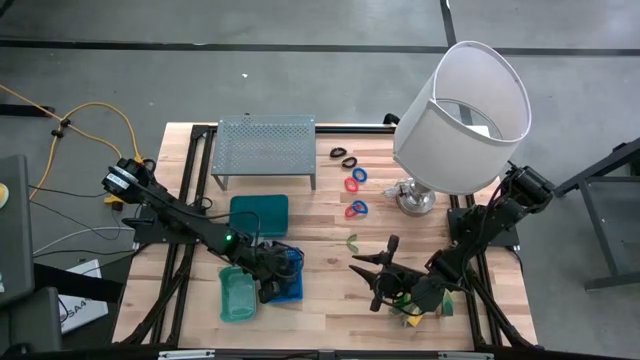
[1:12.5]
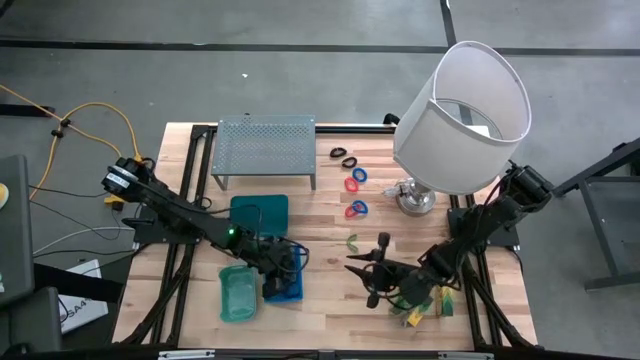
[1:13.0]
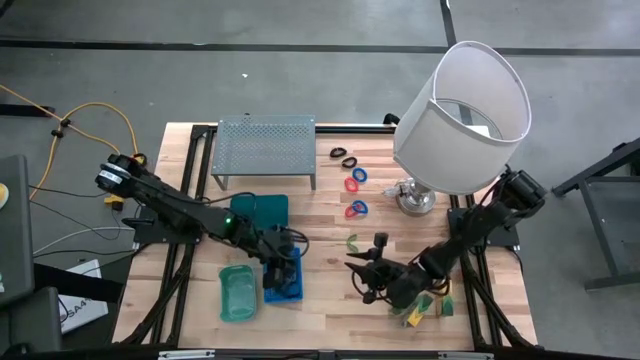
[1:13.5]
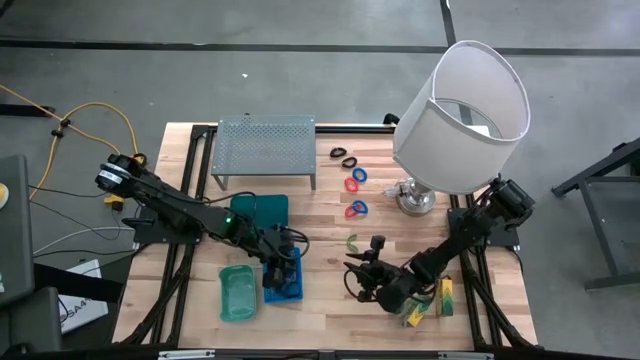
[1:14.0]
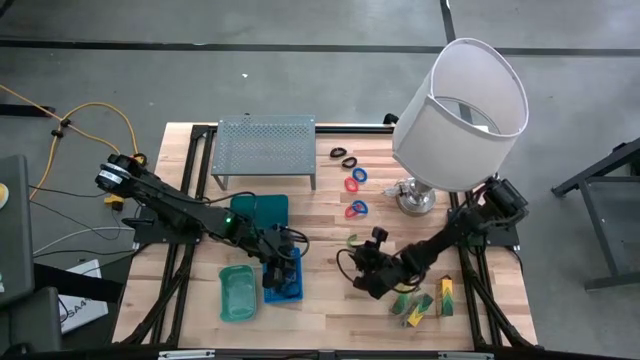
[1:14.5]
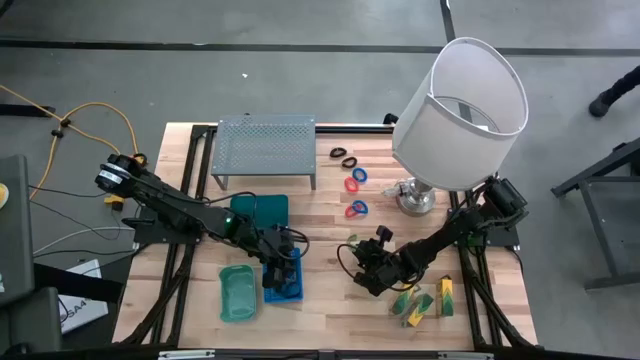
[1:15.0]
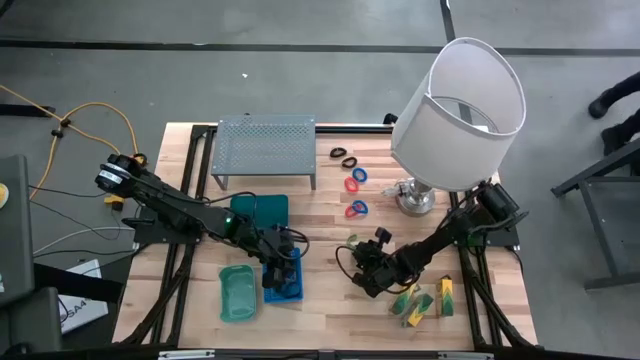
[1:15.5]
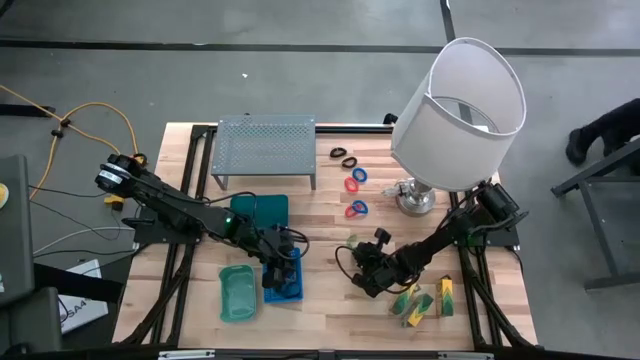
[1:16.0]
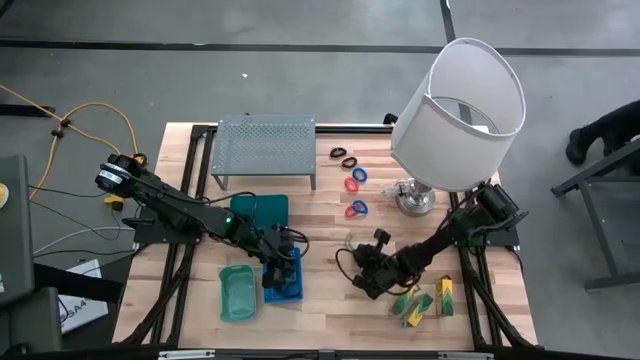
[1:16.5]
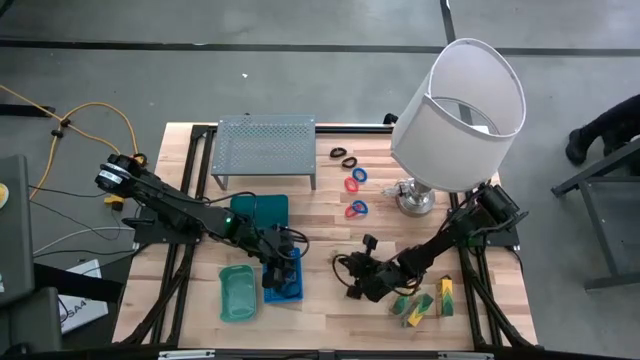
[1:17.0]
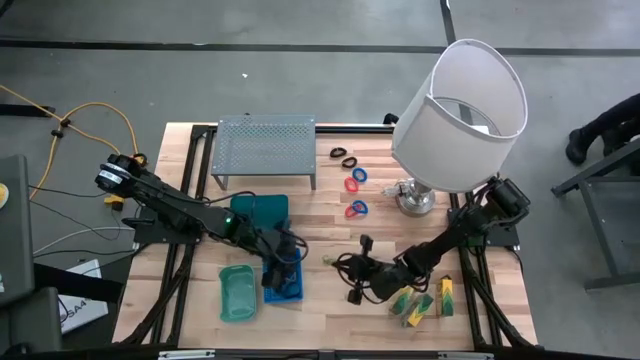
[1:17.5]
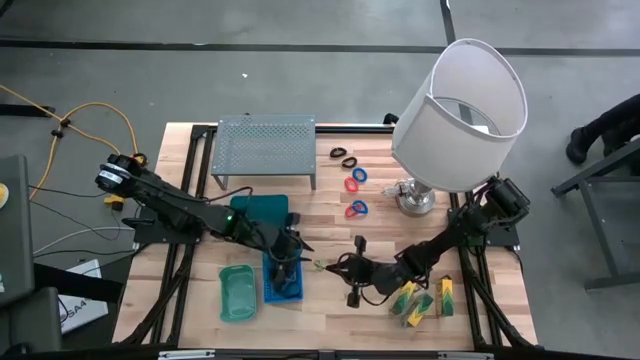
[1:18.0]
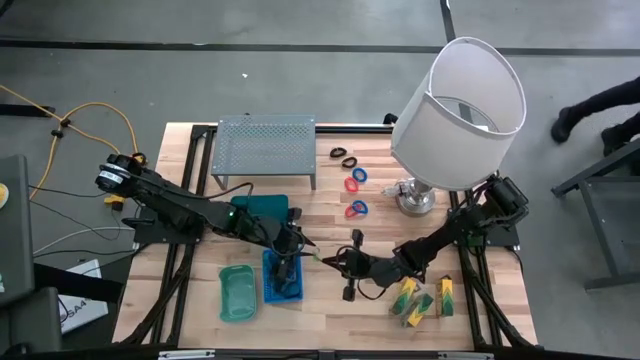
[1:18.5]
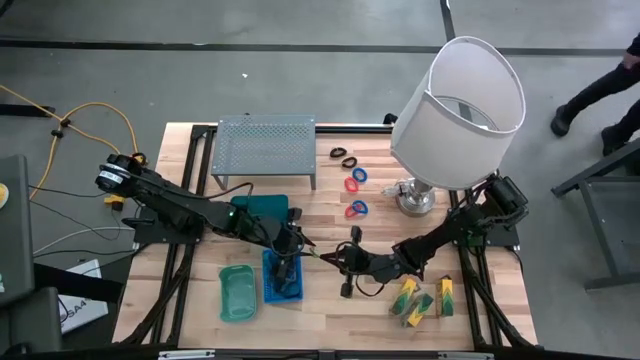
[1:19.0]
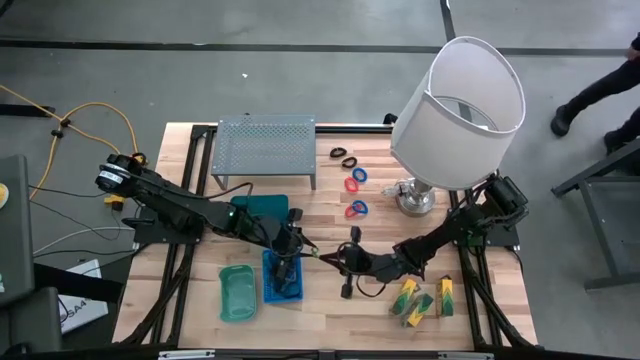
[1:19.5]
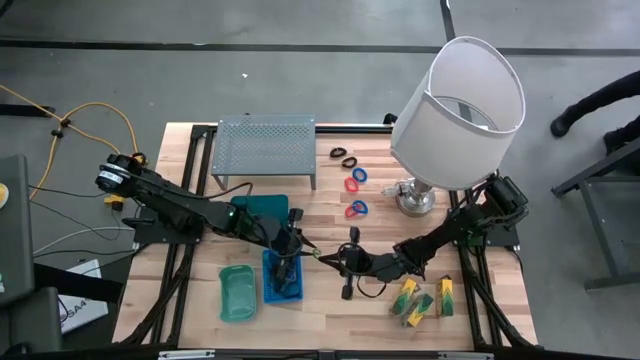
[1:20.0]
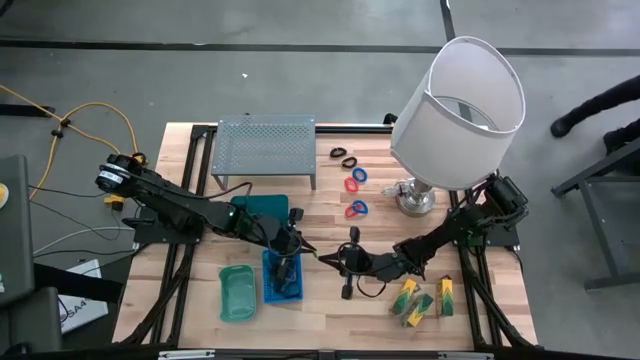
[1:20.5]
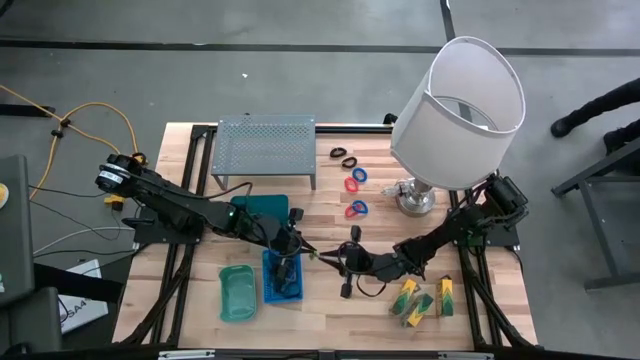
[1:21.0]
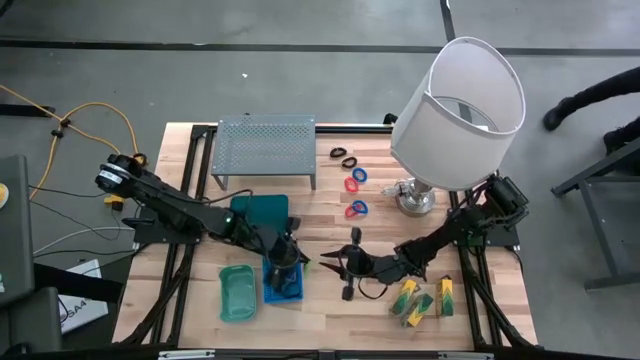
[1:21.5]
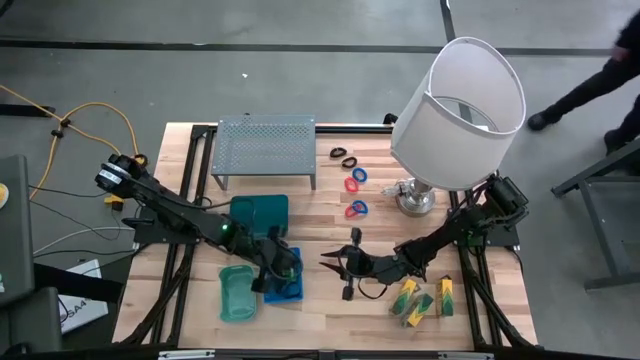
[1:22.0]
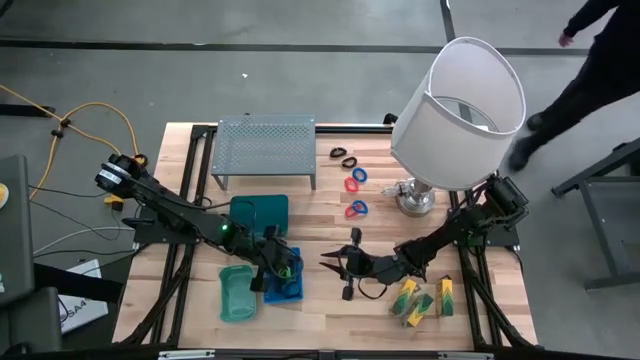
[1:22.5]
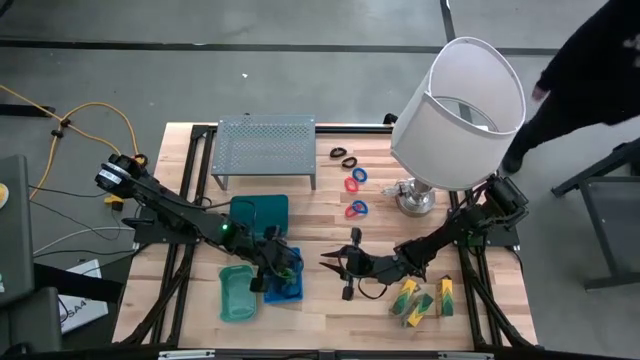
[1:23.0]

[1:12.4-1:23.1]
Task: Pick & Place Office Desk Supplies
Put the green rubber band into the bottom blue bin

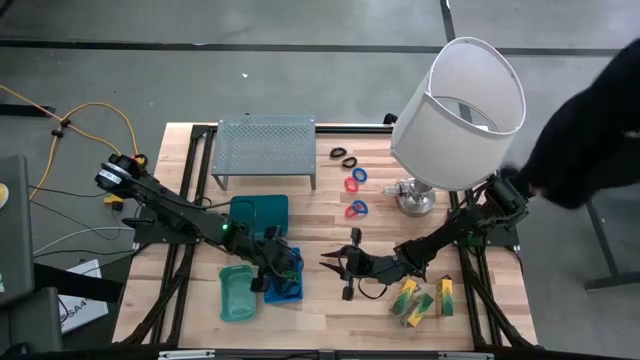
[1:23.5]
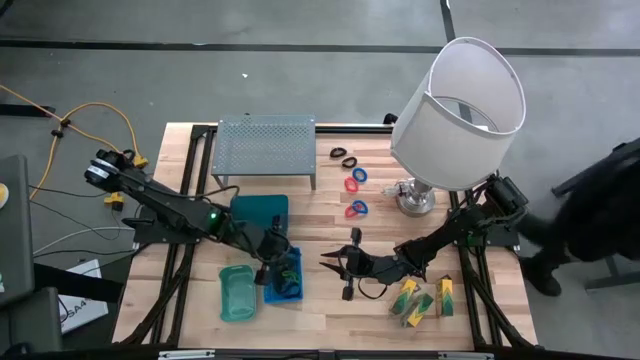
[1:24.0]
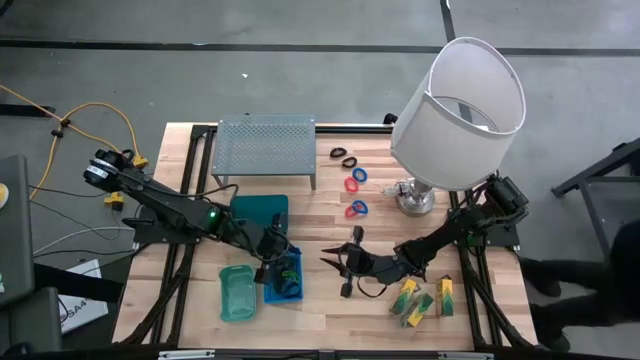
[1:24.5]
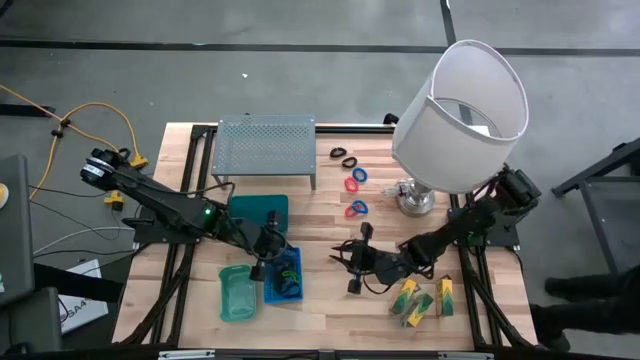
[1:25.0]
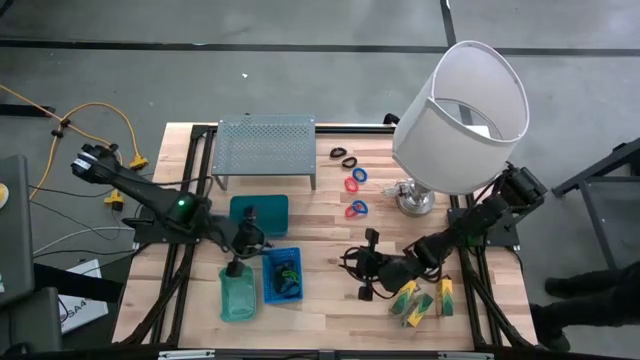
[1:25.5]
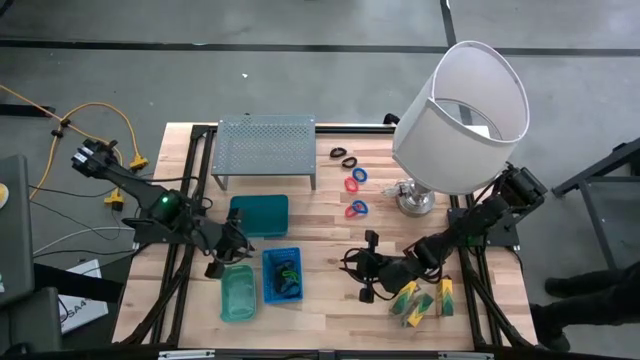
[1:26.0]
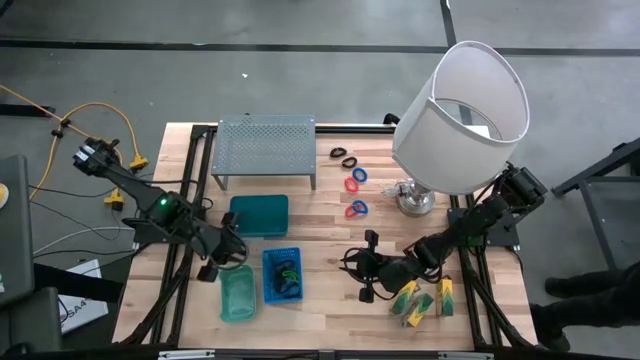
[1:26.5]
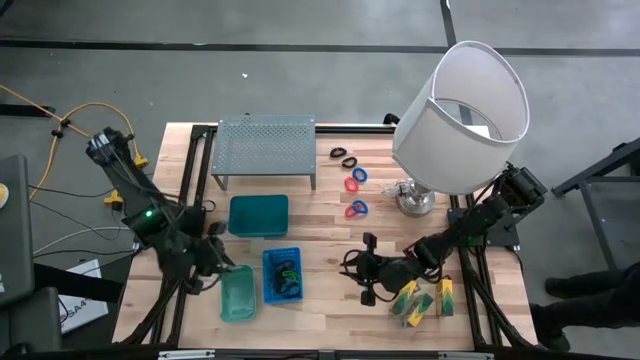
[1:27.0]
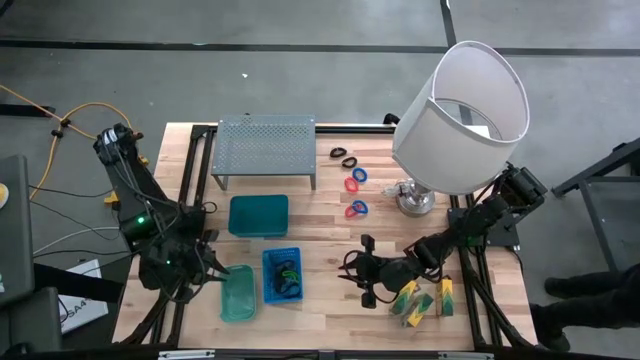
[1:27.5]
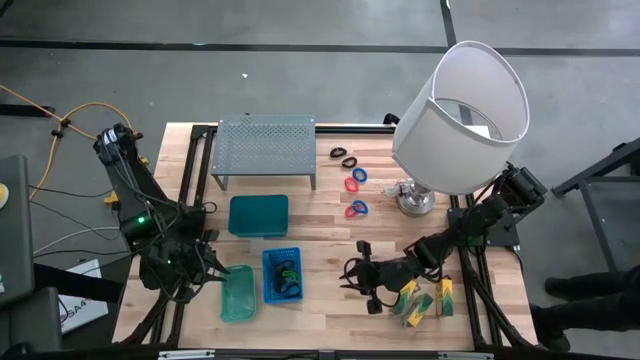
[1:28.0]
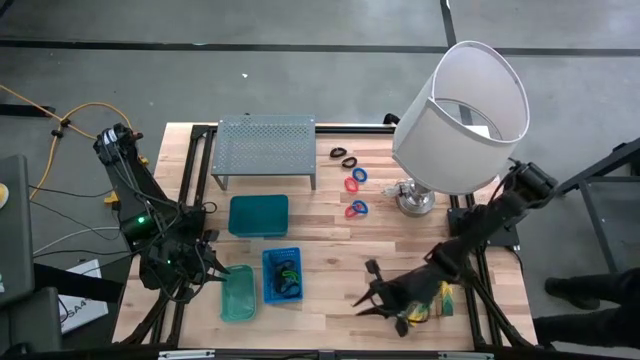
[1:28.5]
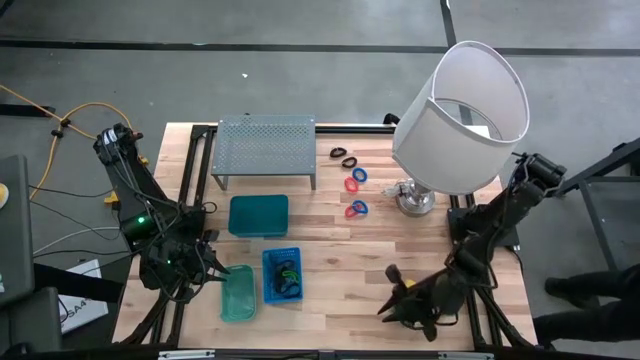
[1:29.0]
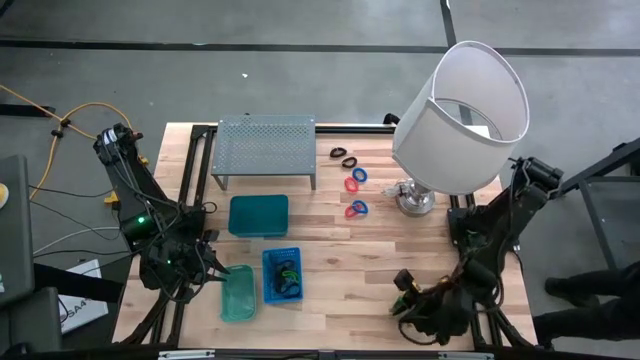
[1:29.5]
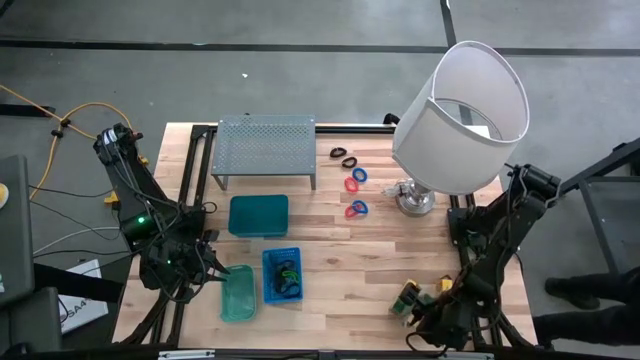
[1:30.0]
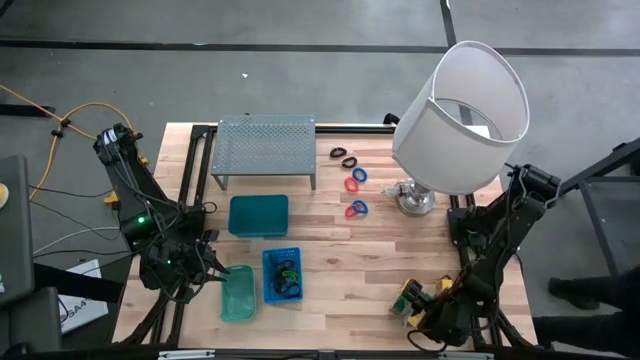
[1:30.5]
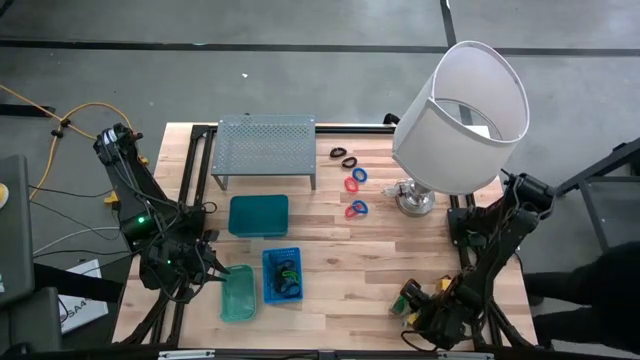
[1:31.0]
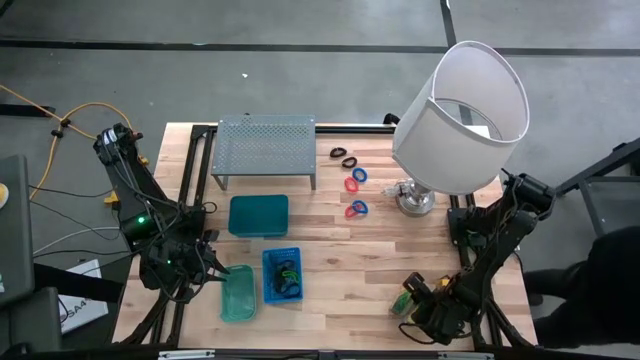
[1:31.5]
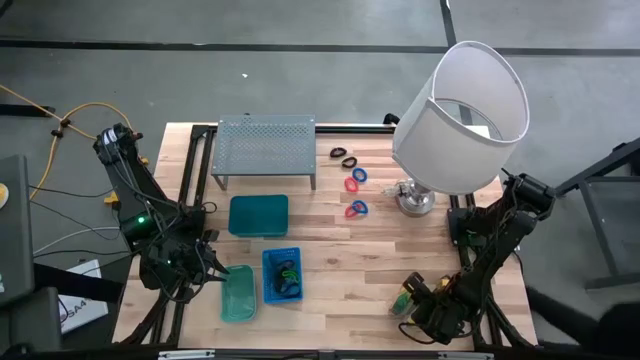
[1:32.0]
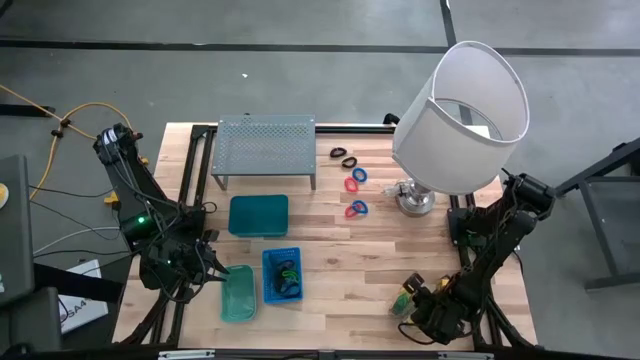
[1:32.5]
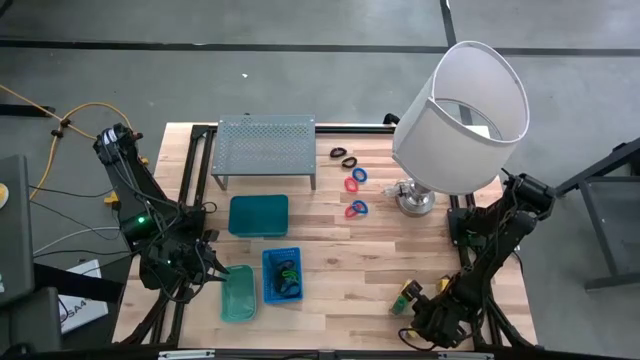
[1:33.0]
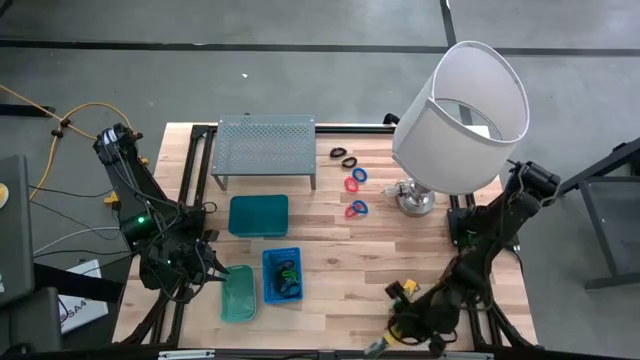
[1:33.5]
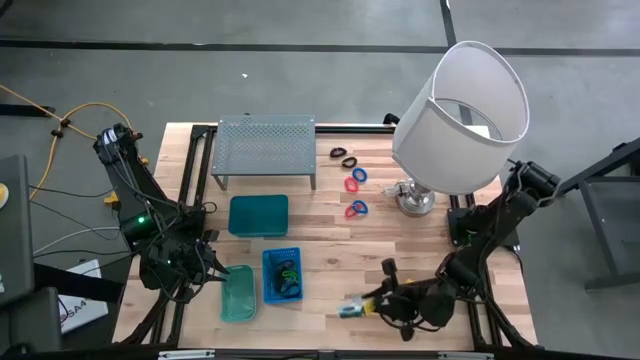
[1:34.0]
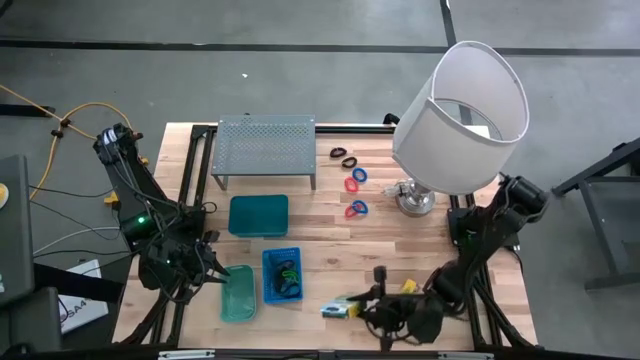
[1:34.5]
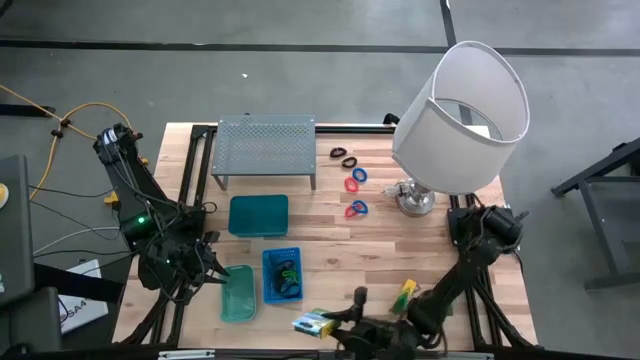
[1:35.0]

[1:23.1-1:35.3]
Put the middle crayon box into the top blue bin
